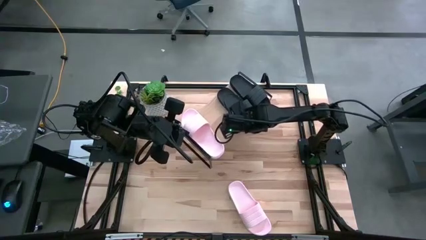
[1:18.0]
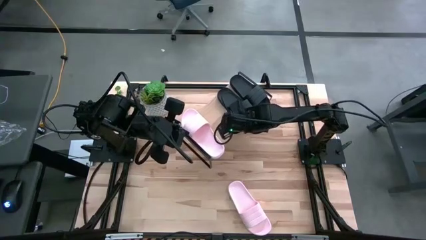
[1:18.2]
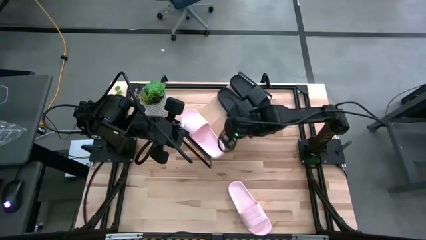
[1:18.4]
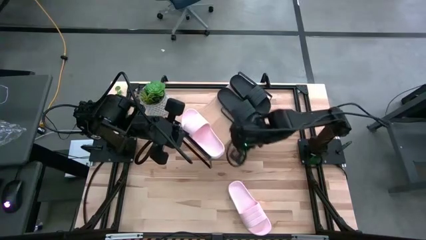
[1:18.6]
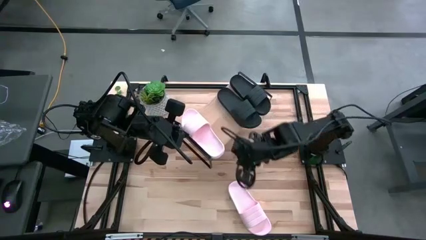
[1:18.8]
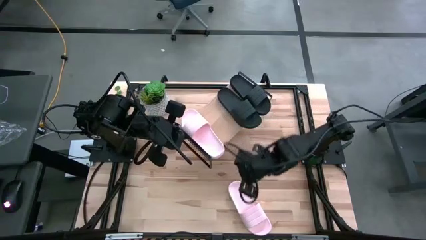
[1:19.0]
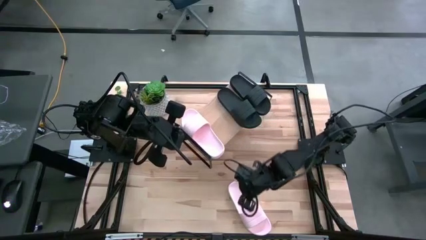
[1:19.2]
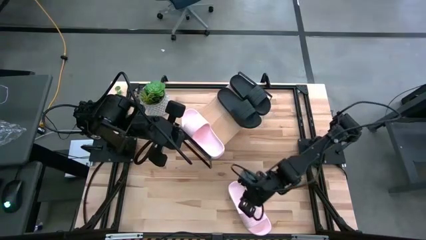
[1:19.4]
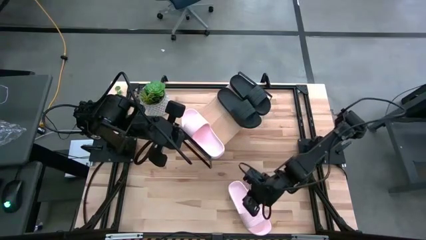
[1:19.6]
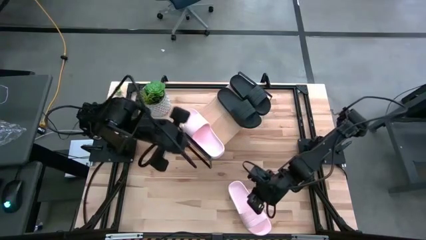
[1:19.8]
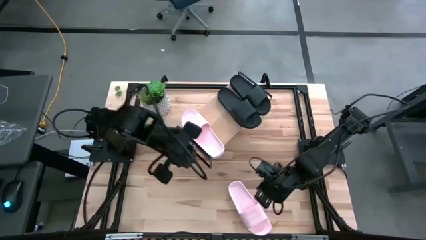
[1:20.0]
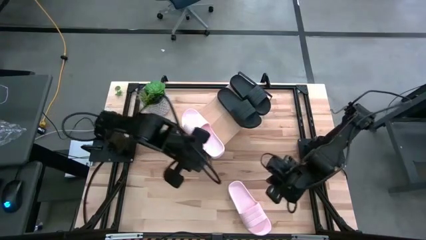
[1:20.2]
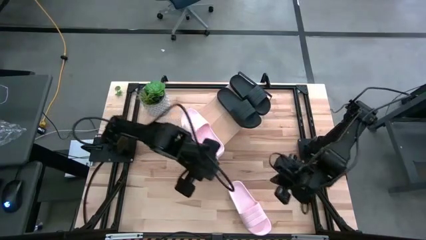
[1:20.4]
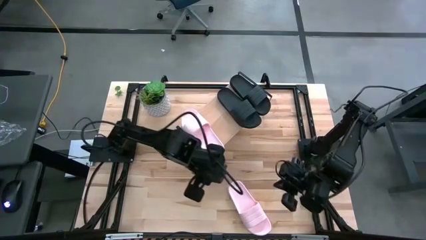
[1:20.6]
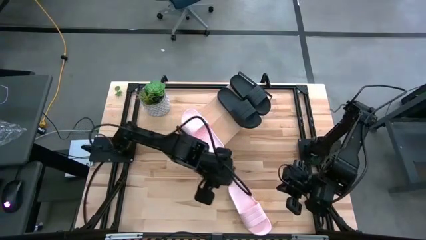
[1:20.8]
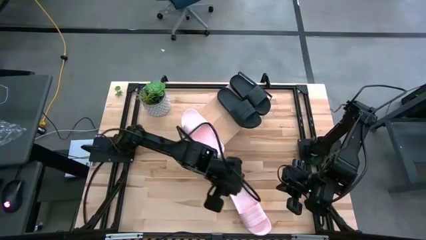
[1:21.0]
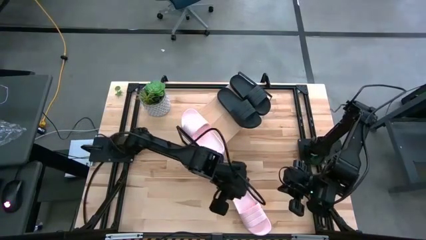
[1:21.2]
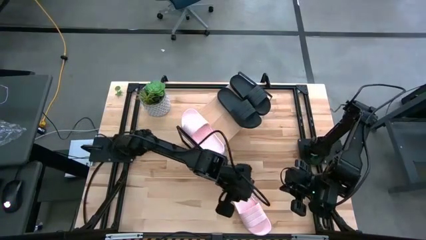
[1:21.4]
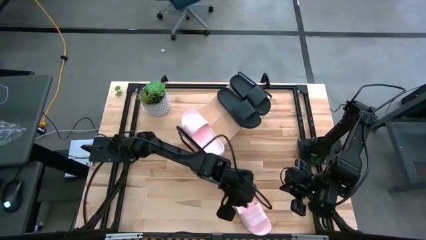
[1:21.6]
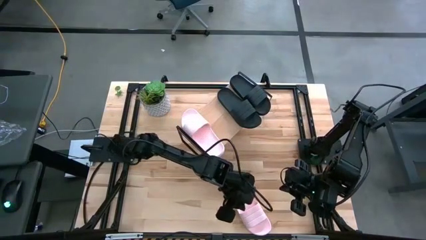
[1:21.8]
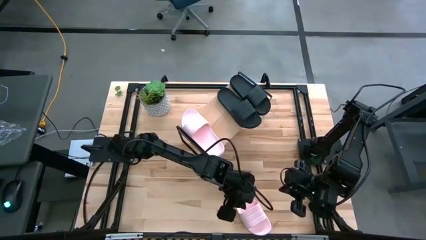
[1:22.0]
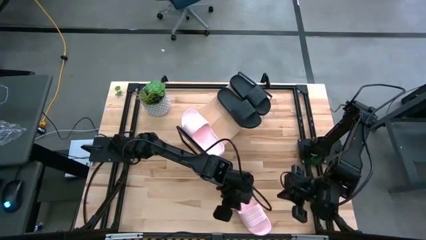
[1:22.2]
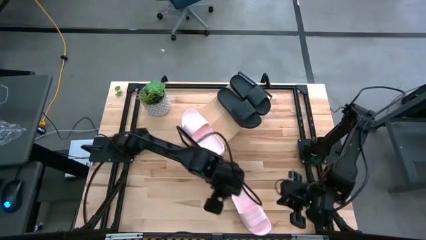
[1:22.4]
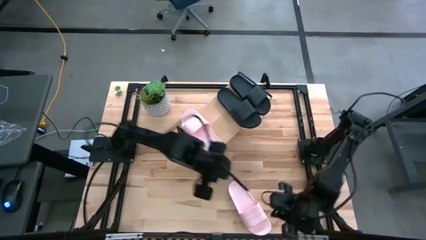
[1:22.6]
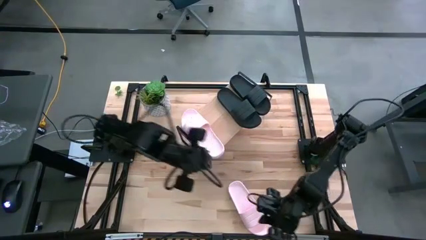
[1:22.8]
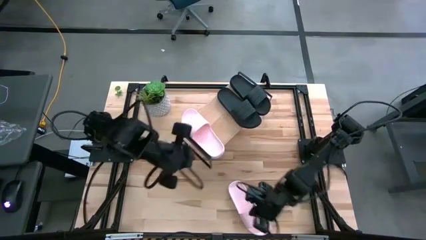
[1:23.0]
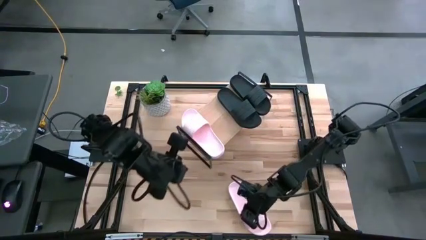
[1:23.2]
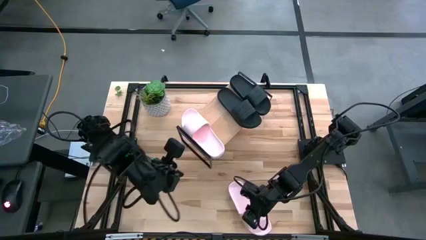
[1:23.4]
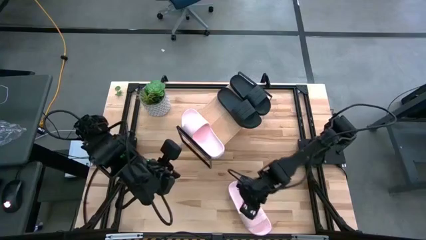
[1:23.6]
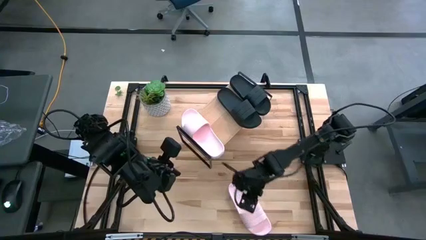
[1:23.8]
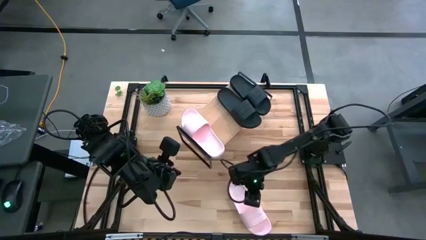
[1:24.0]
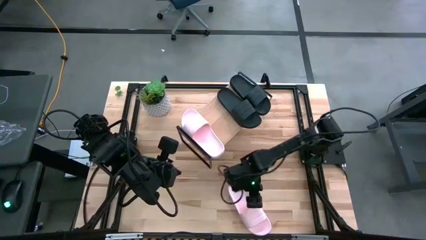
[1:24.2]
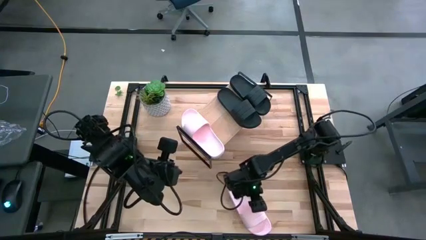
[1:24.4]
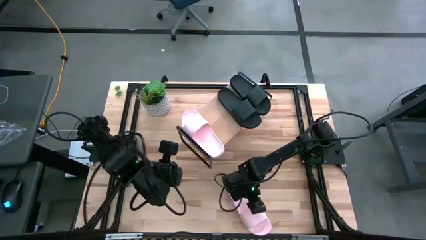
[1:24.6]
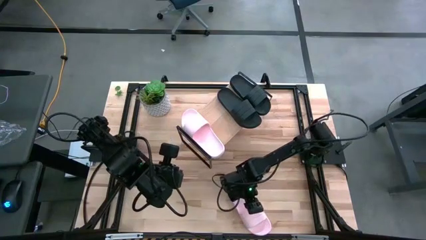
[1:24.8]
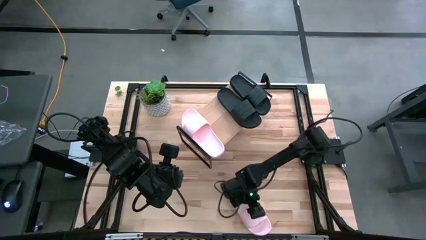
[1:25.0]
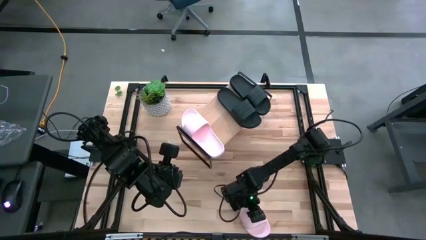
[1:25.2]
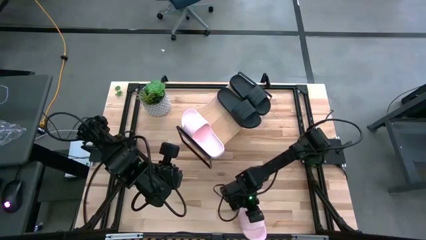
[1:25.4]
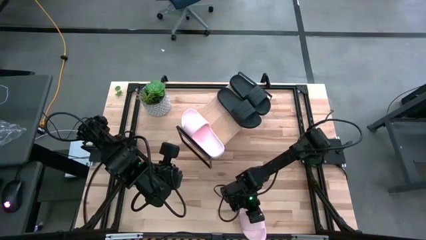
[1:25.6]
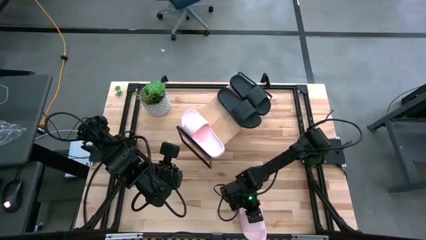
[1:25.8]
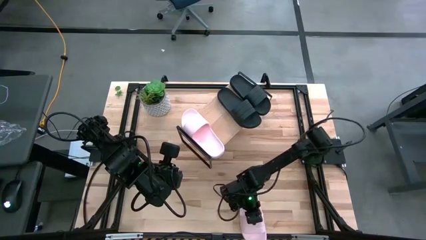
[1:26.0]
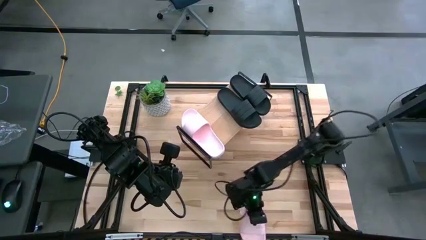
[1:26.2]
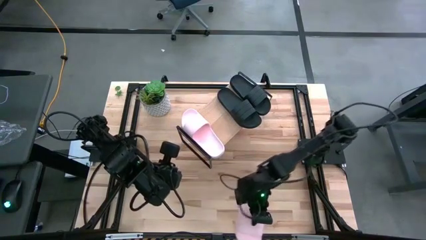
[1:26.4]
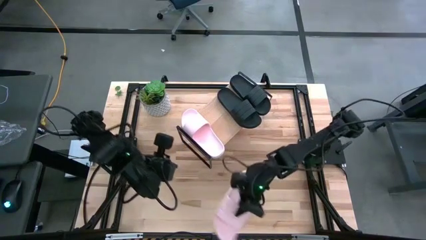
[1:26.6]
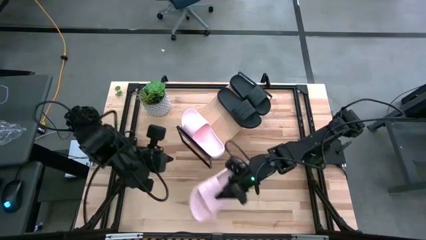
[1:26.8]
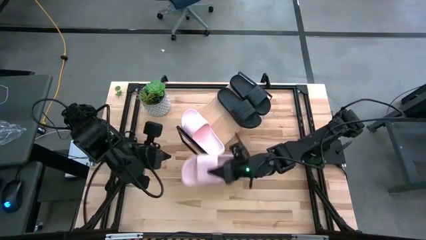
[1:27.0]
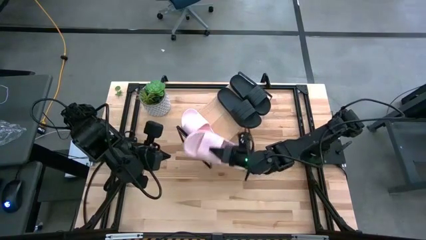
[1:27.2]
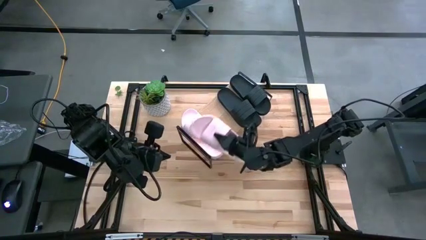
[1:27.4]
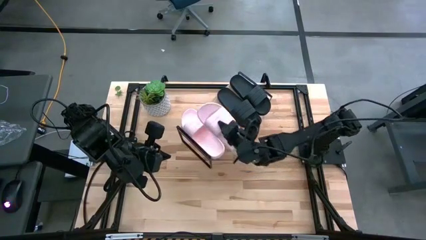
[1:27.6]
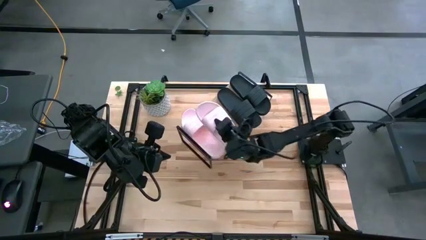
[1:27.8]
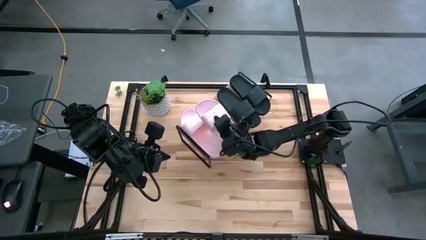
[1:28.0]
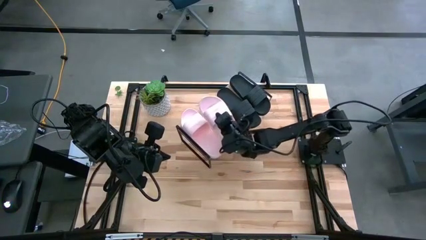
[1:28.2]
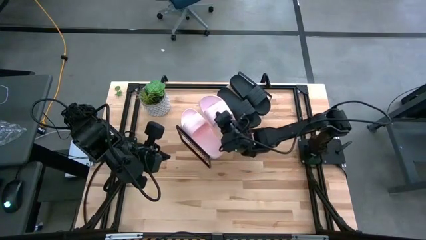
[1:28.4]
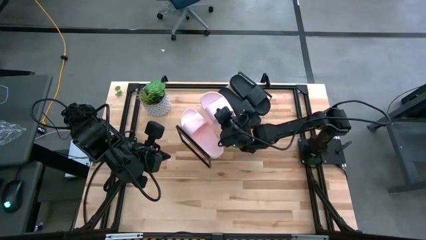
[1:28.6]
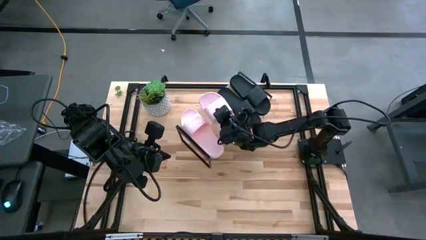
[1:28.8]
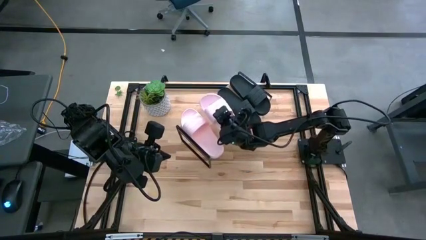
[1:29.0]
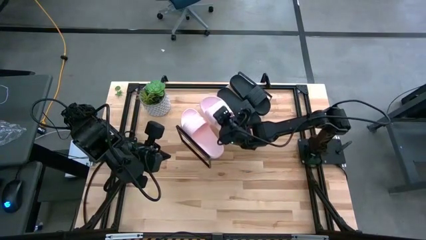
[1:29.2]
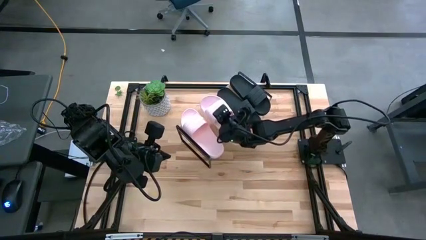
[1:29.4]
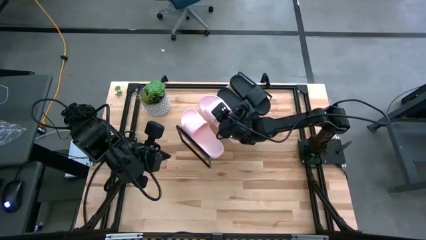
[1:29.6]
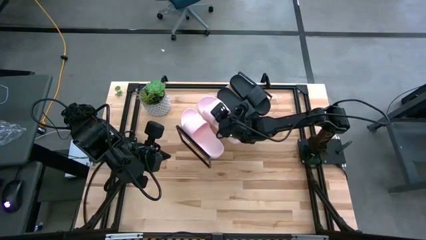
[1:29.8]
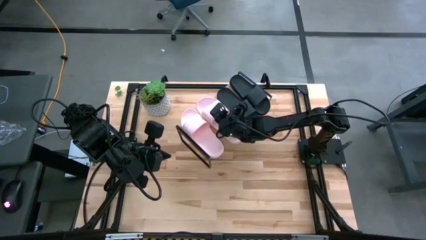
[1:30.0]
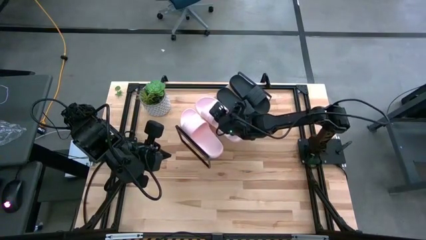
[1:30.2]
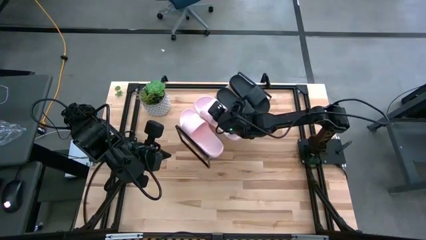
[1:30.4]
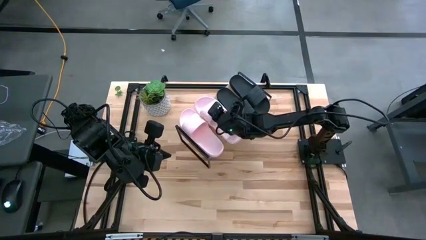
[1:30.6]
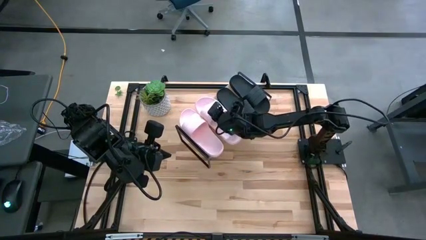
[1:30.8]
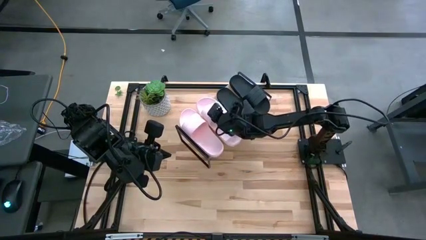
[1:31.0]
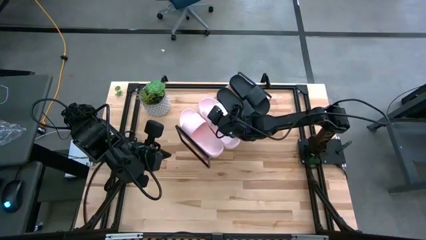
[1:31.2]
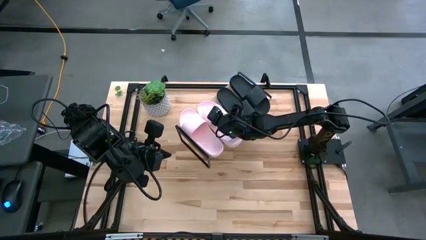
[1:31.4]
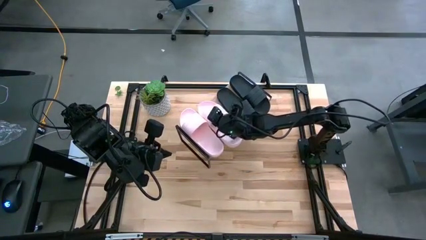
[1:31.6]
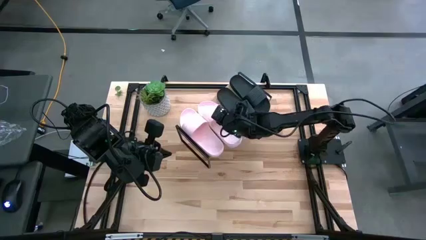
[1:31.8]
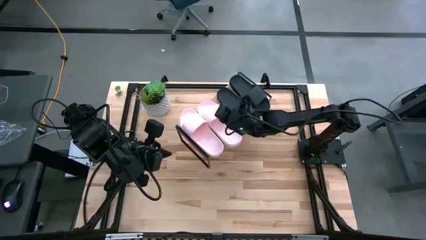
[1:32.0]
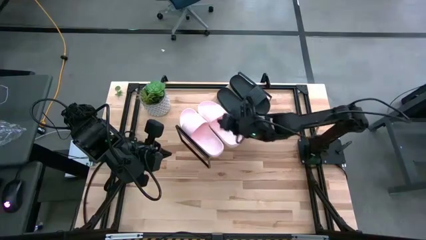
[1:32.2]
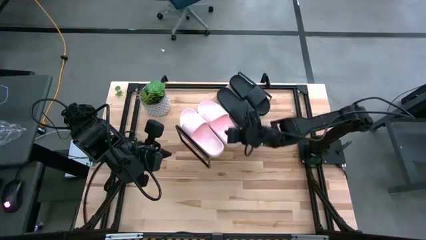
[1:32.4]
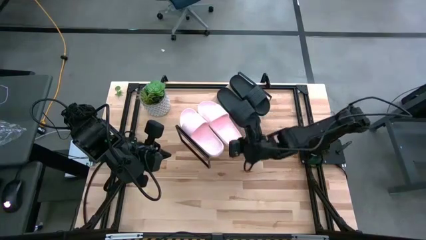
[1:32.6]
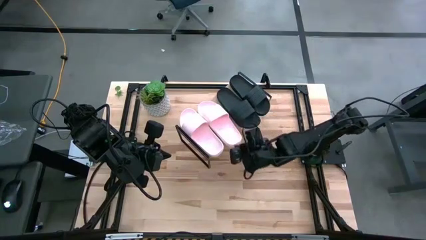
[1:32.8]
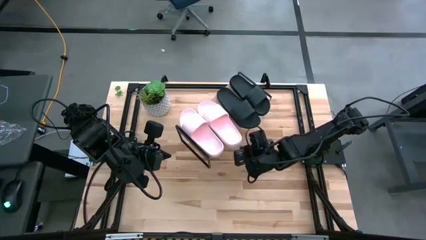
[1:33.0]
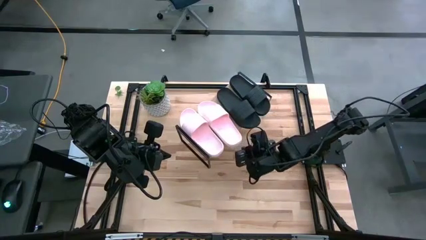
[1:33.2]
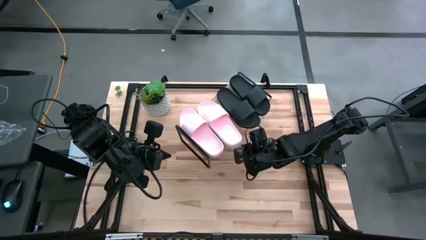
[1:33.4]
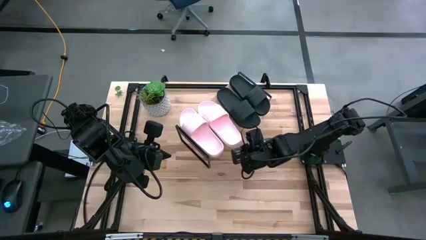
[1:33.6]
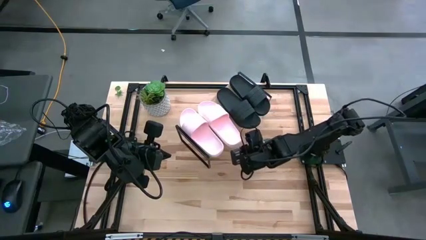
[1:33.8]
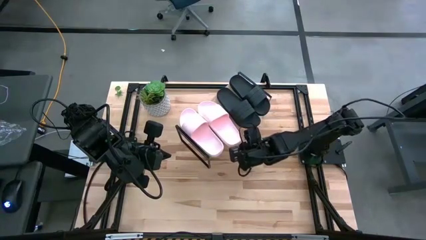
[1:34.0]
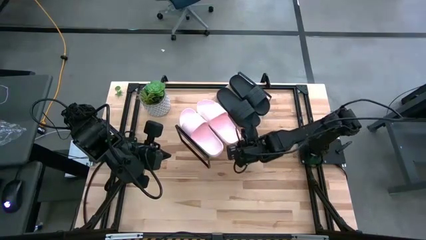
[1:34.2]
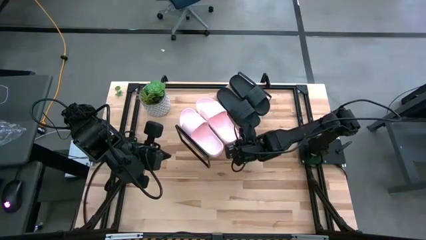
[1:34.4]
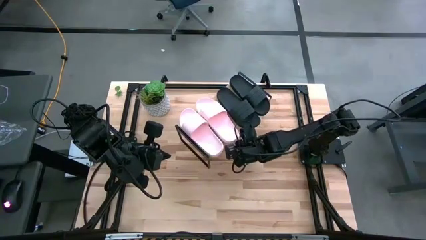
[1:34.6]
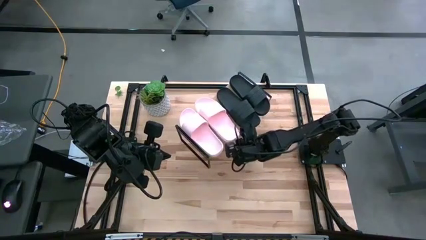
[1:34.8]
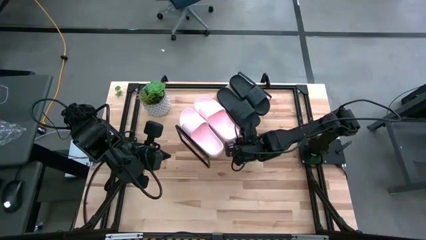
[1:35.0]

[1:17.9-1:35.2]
Task: Pick and place slides into the shelf
Put the pink slide on the shelf
